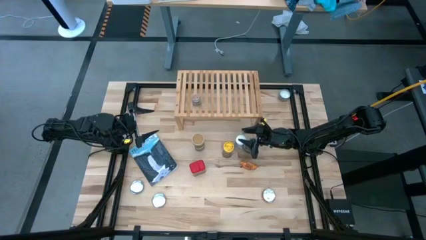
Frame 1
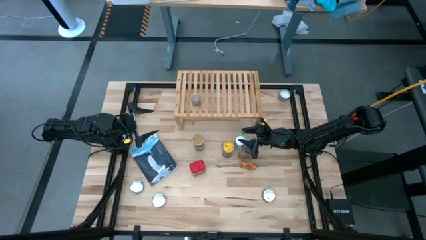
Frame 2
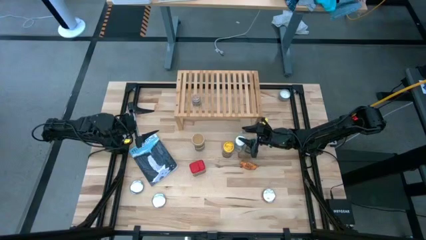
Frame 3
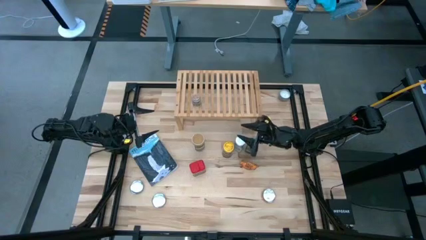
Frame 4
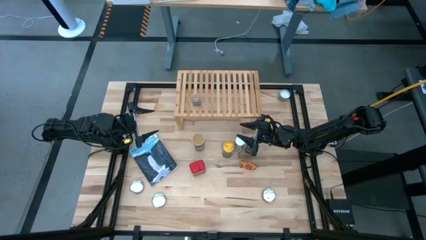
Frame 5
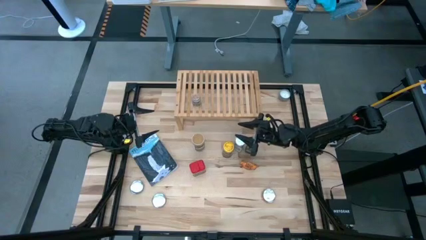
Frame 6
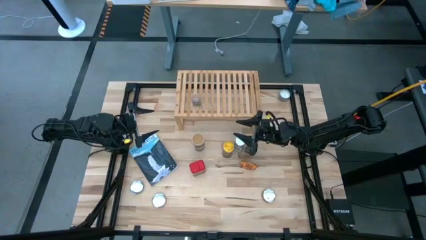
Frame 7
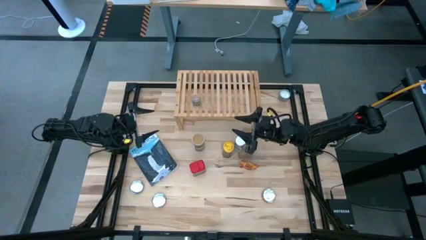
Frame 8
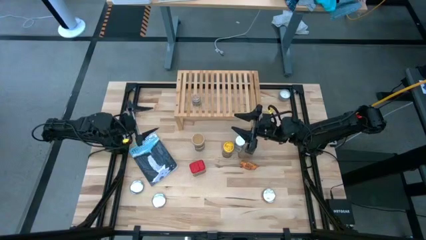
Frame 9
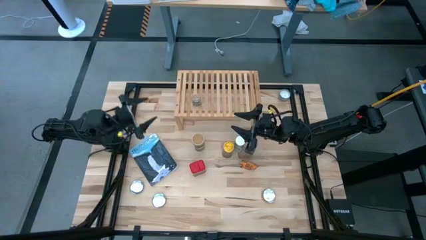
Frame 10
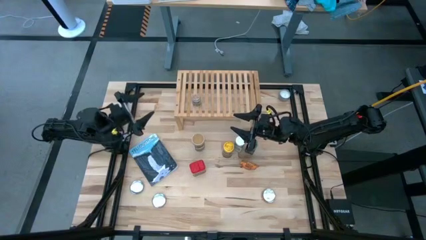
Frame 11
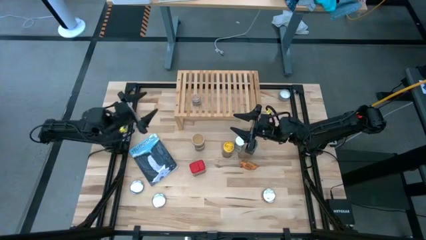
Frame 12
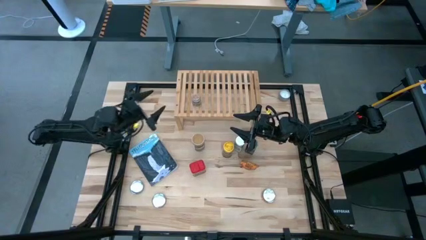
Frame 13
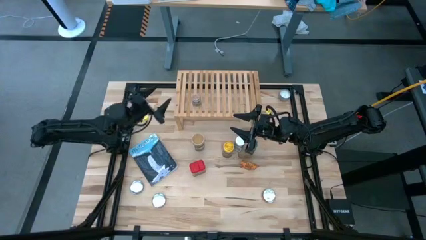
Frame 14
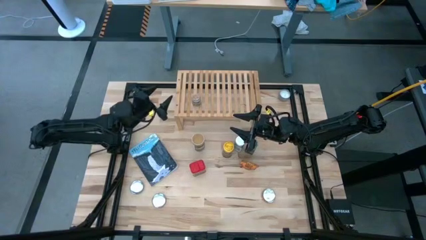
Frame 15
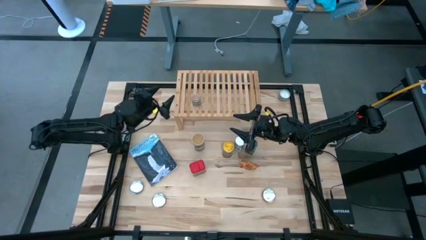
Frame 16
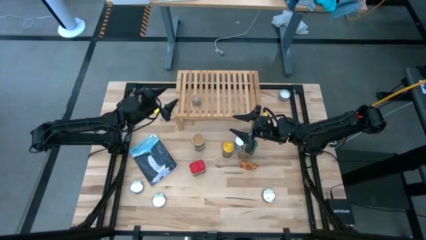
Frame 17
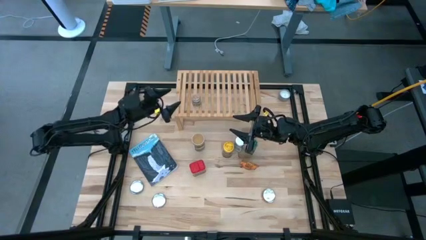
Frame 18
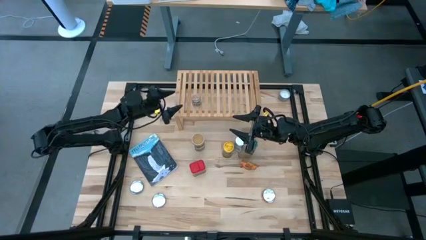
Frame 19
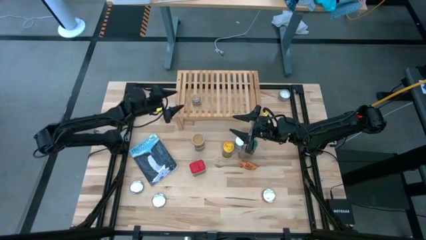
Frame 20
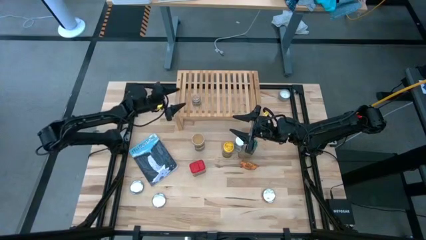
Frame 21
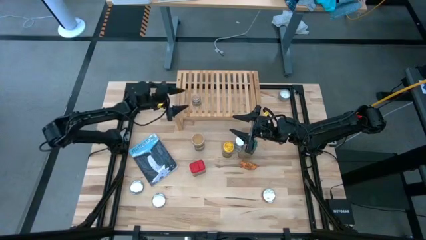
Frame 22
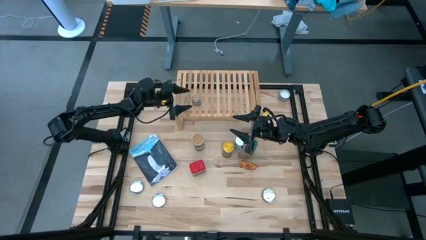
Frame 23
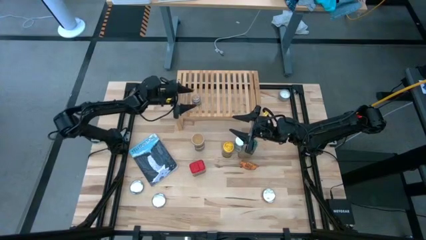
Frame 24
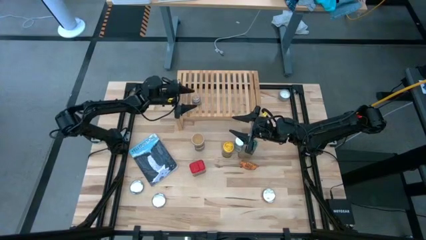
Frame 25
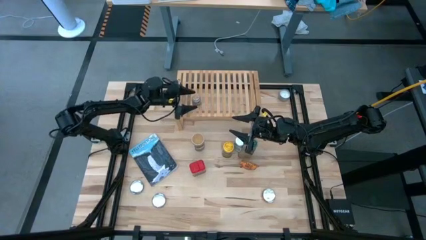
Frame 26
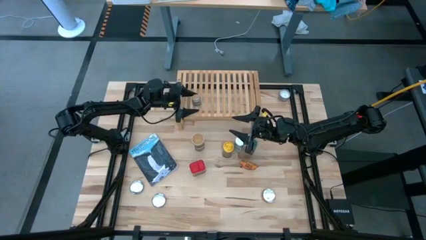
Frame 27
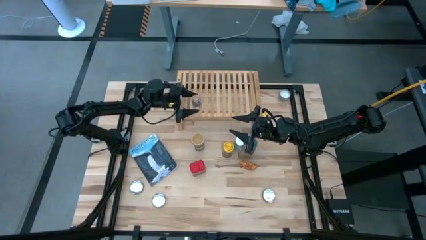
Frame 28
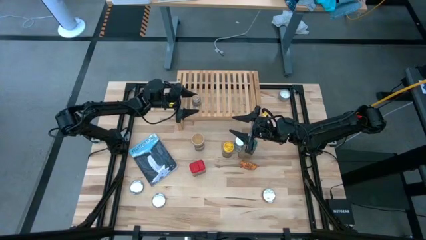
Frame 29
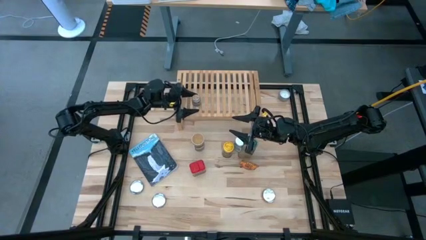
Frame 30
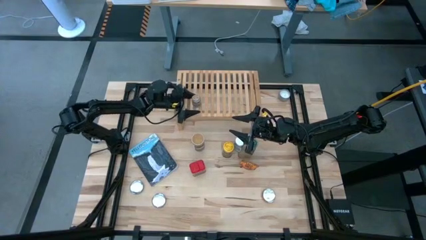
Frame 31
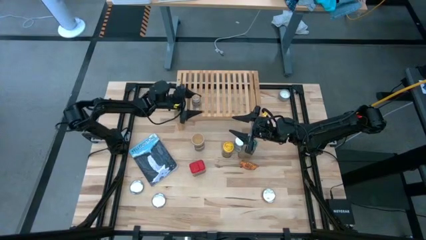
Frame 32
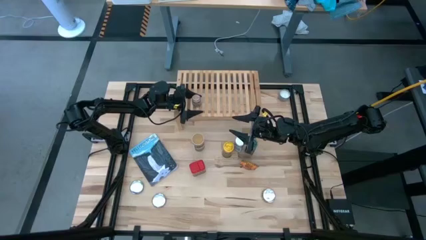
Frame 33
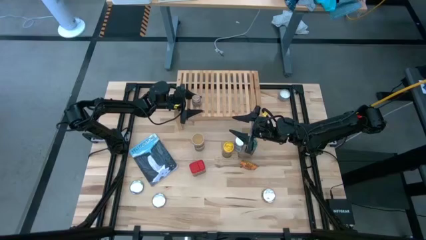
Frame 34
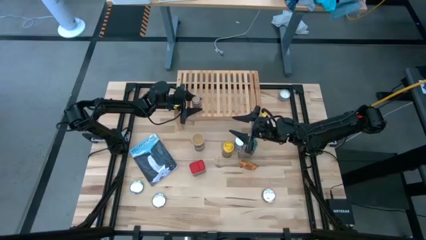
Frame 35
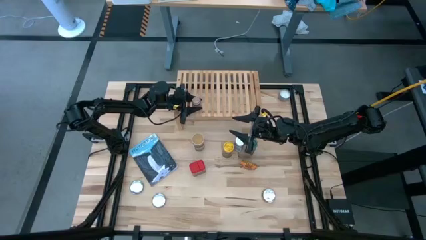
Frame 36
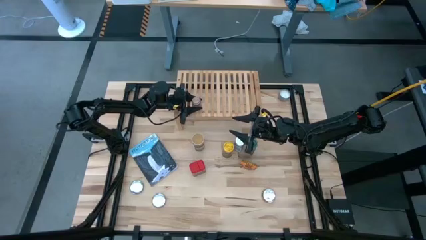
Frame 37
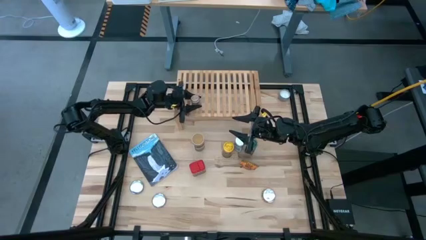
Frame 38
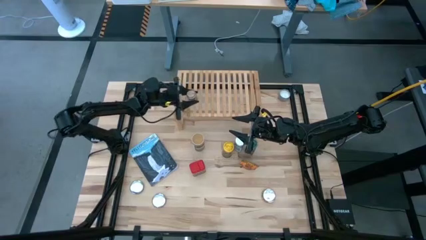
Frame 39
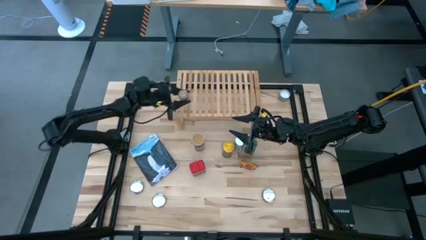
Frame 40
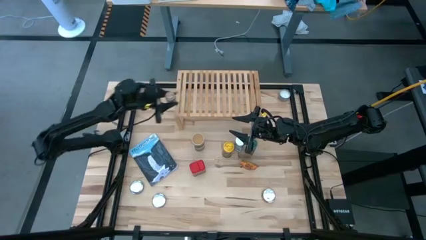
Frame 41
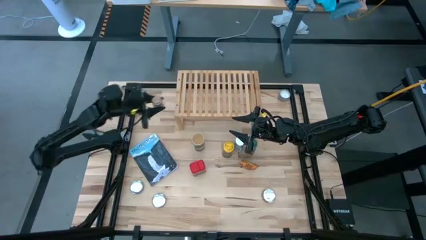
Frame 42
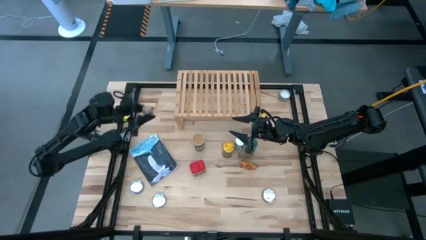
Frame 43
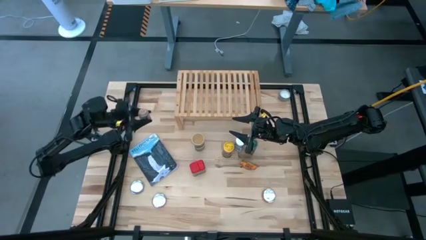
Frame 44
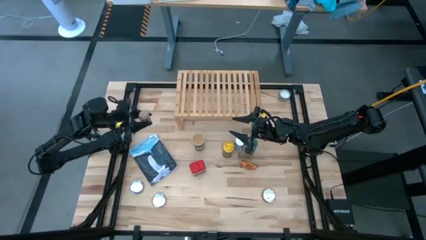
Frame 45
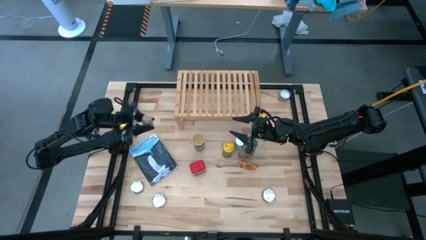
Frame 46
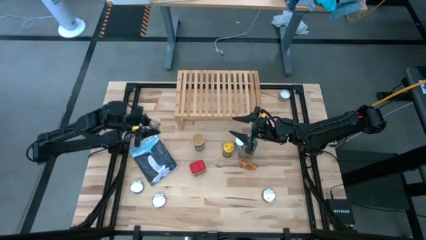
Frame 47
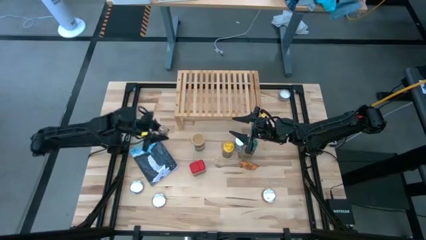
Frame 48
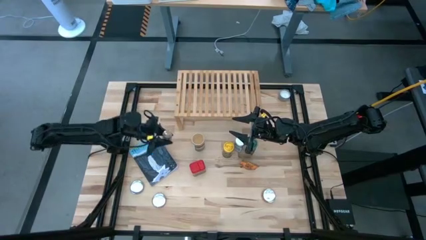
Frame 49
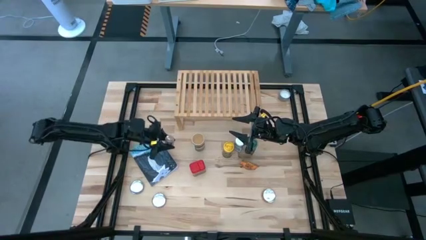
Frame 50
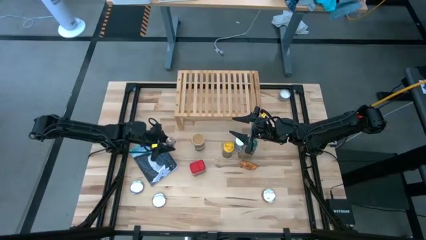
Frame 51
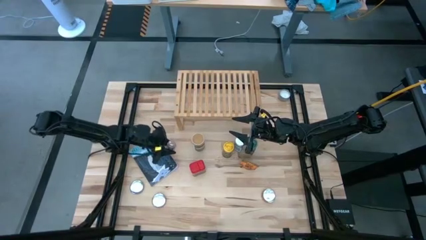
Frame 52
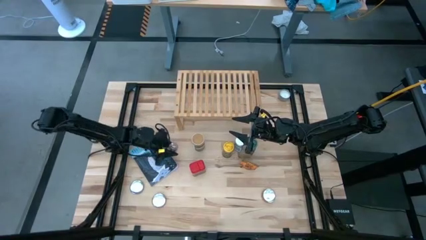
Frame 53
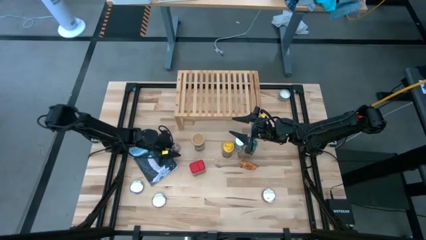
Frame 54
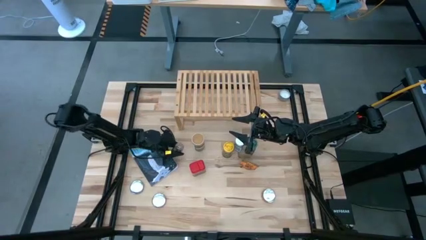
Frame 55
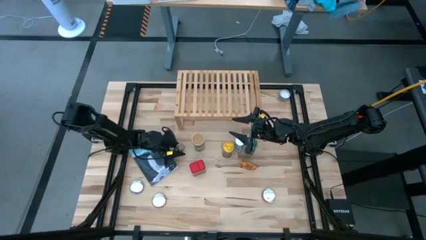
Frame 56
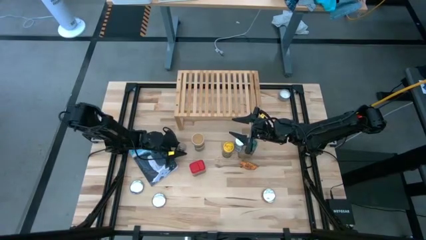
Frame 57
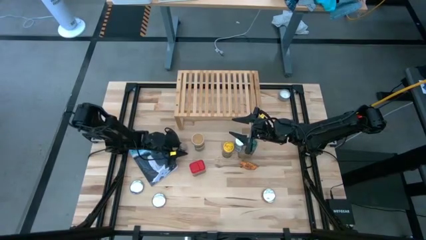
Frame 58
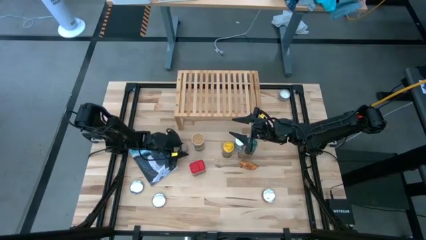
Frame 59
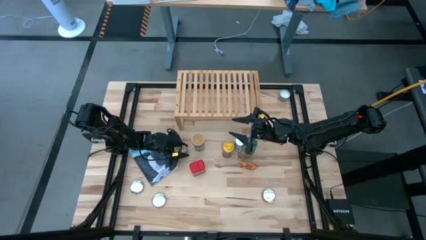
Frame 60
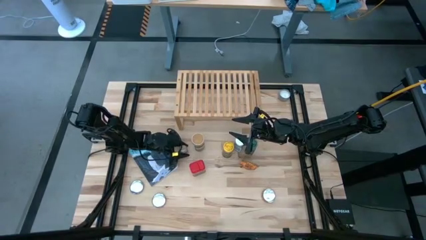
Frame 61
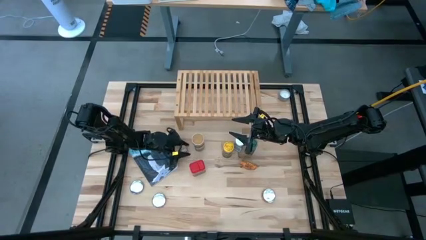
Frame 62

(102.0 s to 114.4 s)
Task: Shelf spices
Remove the transparent seasoning bottle from the shelf

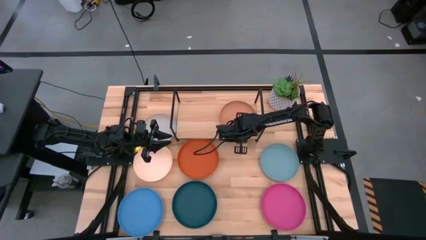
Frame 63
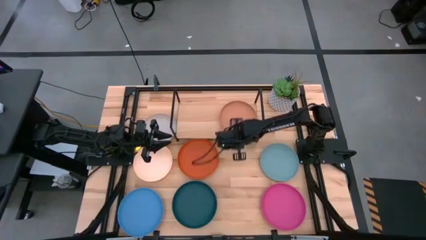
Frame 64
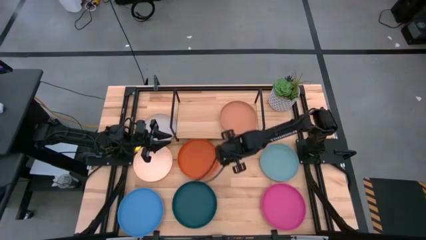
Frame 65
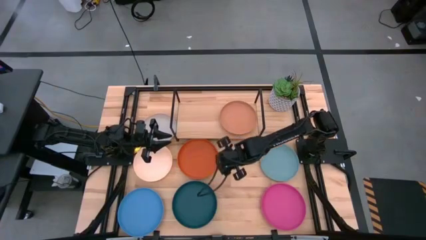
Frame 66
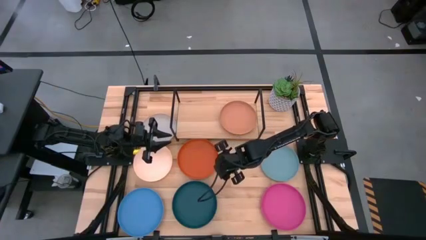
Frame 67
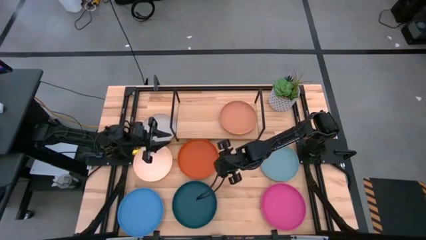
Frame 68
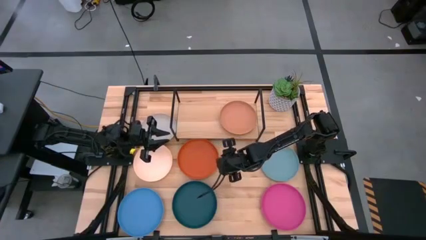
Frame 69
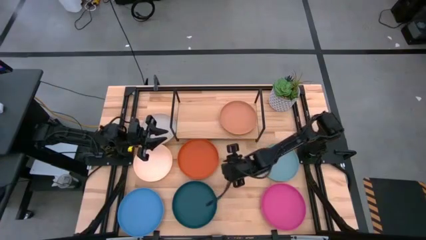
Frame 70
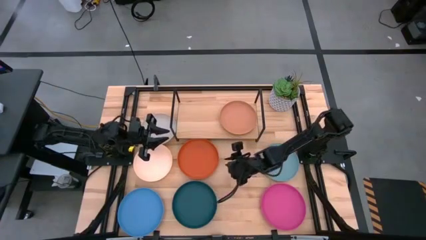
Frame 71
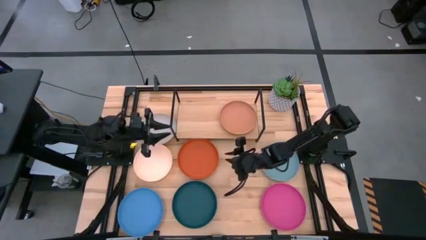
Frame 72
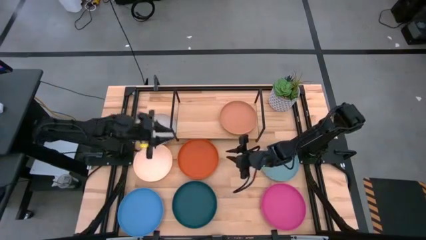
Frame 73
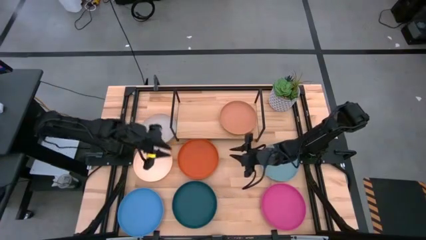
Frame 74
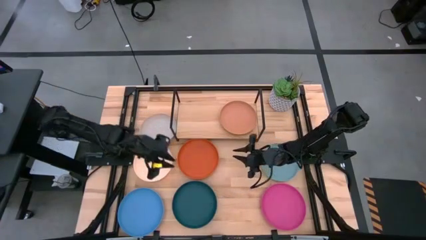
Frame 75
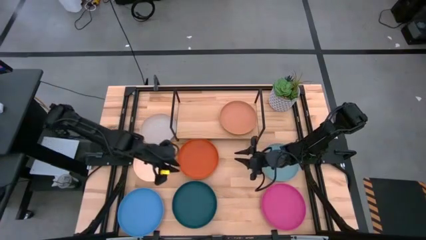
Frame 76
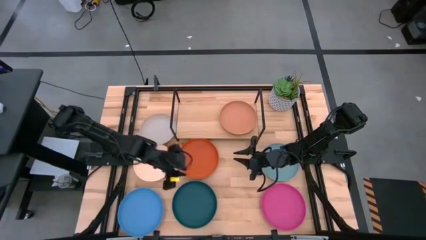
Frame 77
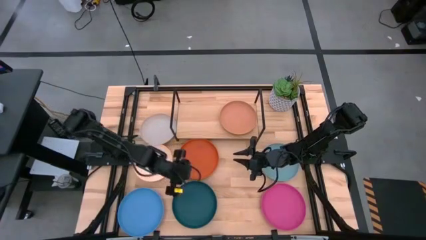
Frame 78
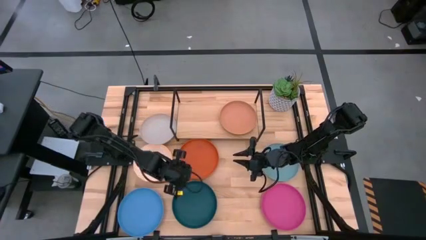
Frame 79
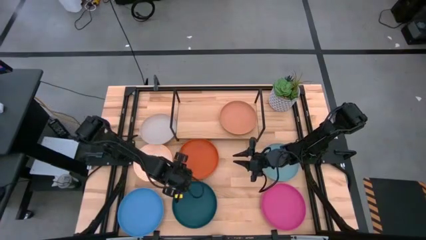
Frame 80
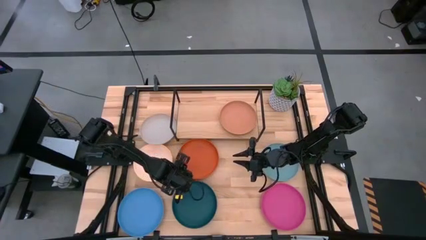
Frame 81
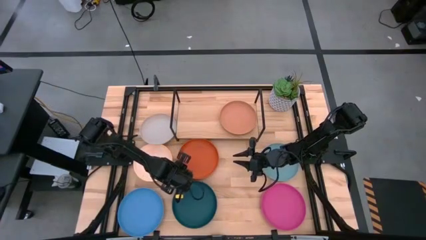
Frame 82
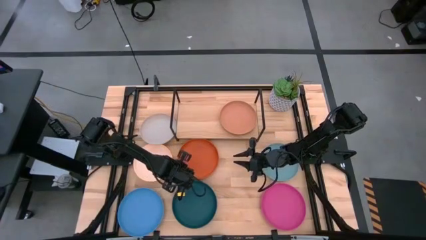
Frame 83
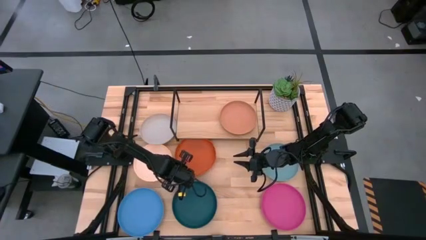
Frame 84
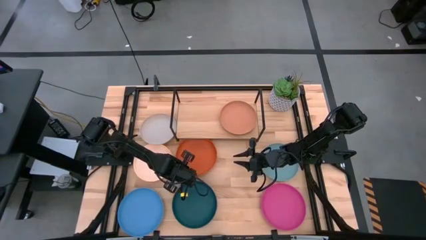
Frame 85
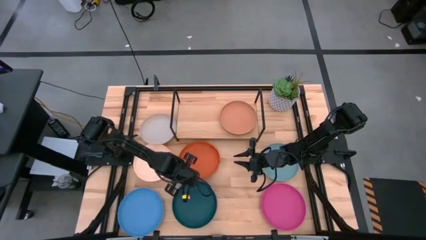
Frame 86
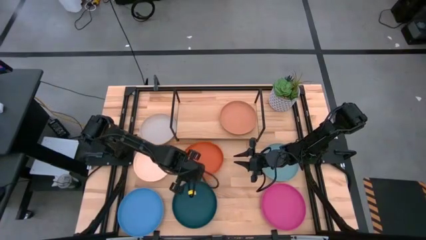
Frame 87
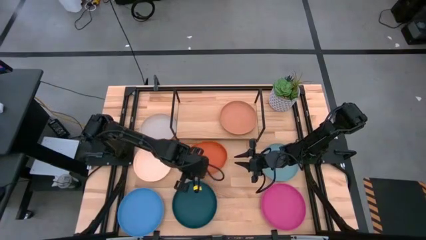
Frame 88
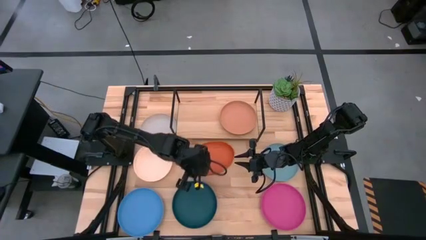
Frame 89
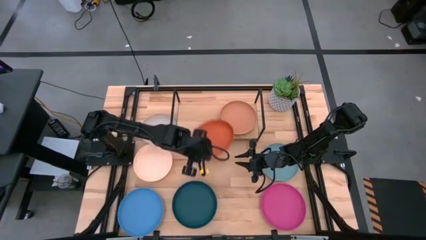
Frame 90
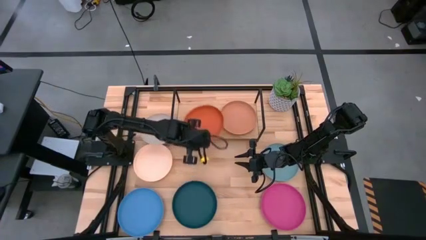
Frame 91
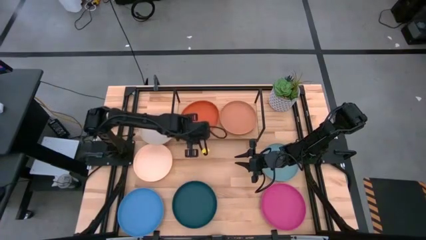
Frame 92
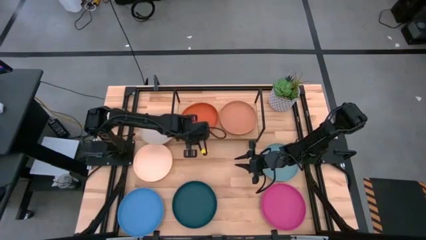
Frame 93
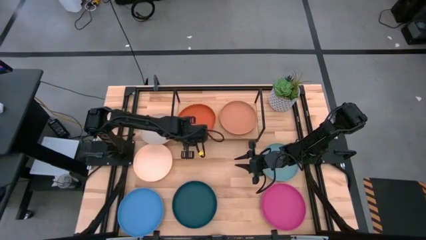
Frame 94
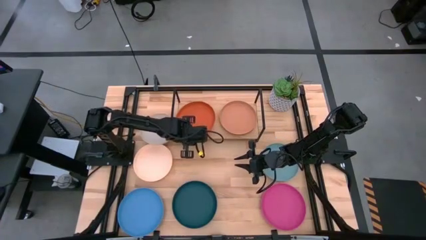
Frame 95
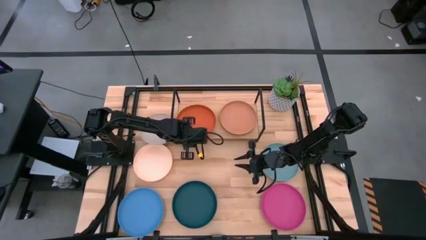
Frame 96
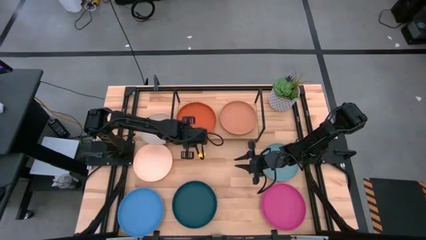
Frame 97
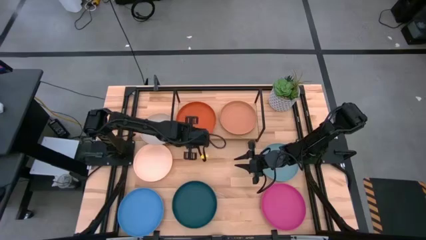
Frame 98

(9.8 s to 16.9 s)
Task: Place and stack plates onto a shelf
Put the orange plate on the shelf
